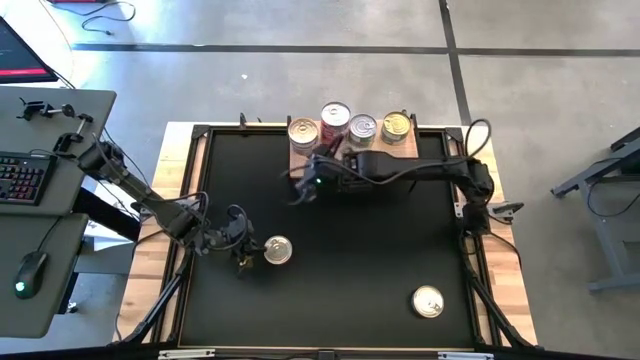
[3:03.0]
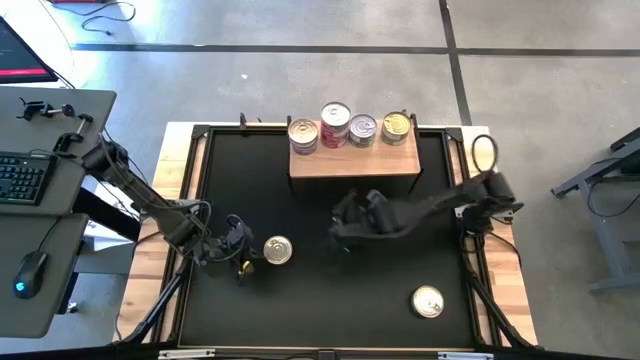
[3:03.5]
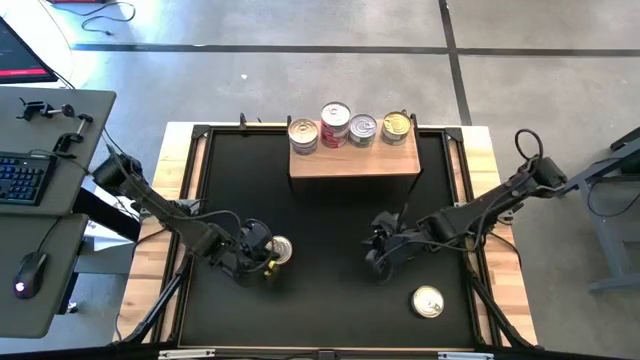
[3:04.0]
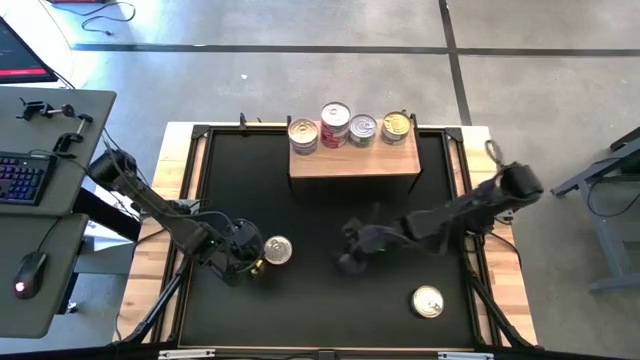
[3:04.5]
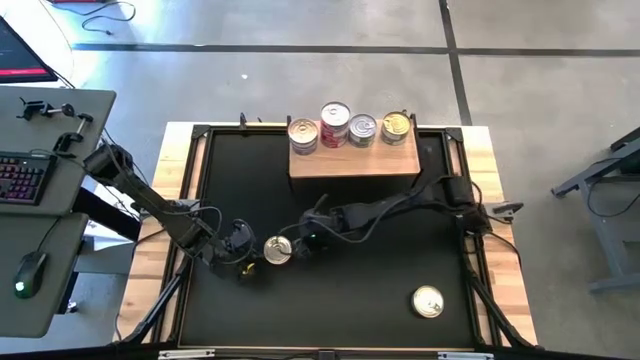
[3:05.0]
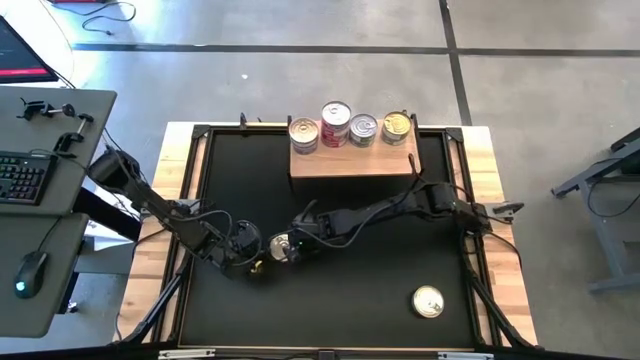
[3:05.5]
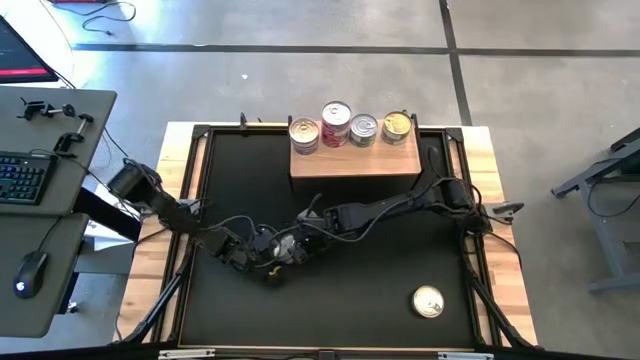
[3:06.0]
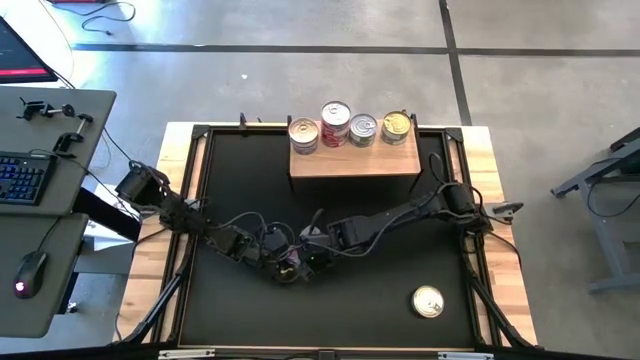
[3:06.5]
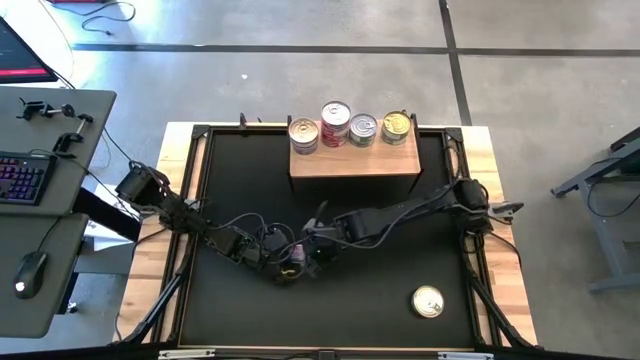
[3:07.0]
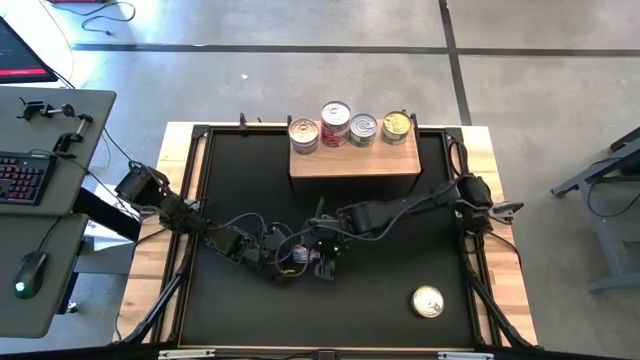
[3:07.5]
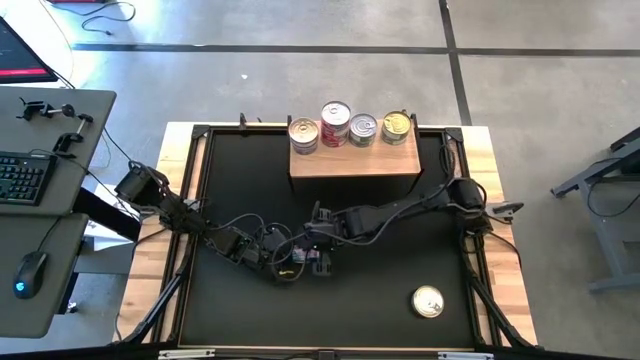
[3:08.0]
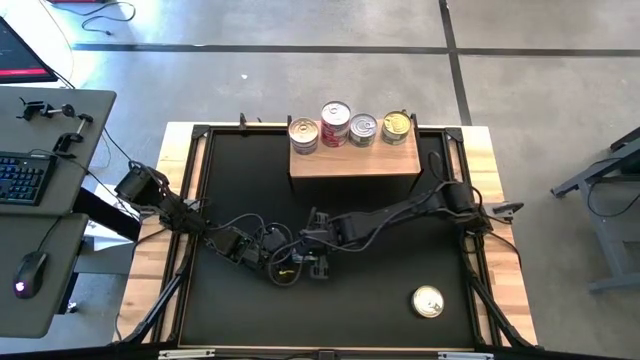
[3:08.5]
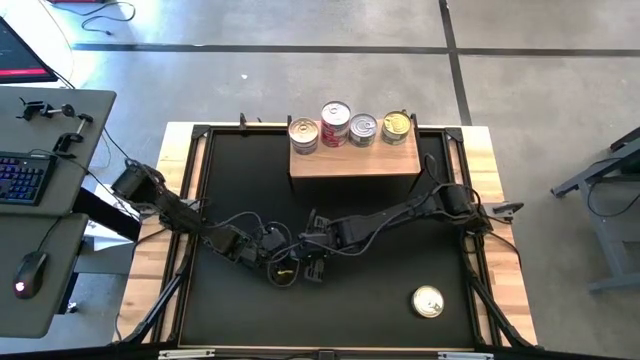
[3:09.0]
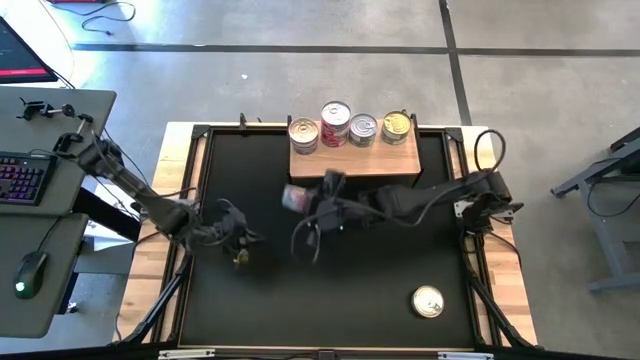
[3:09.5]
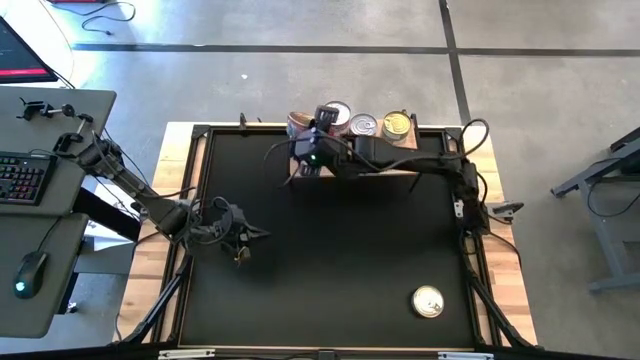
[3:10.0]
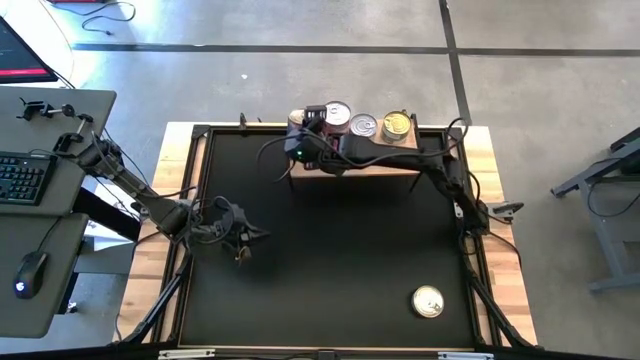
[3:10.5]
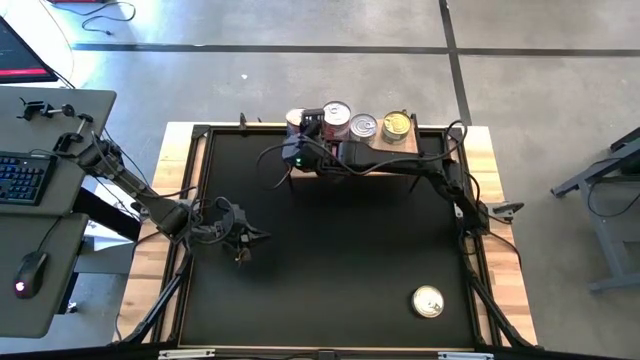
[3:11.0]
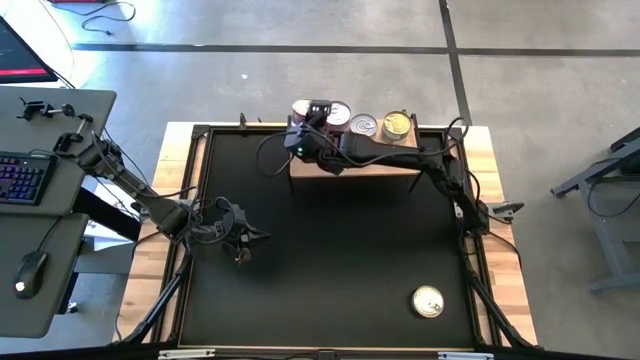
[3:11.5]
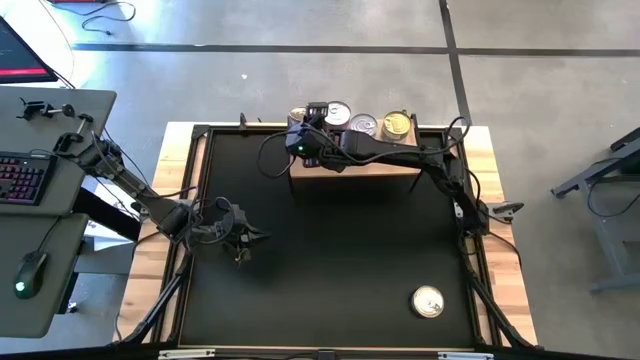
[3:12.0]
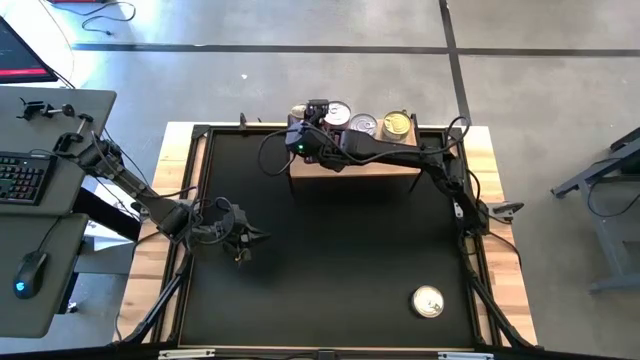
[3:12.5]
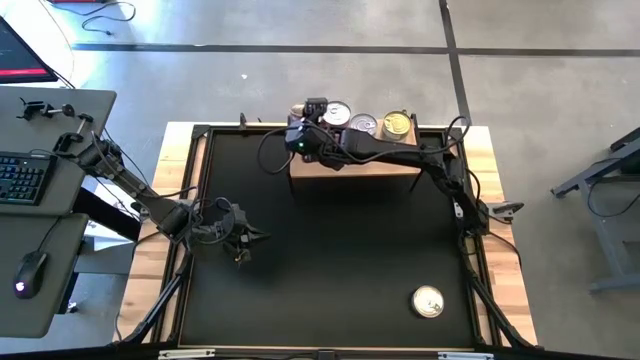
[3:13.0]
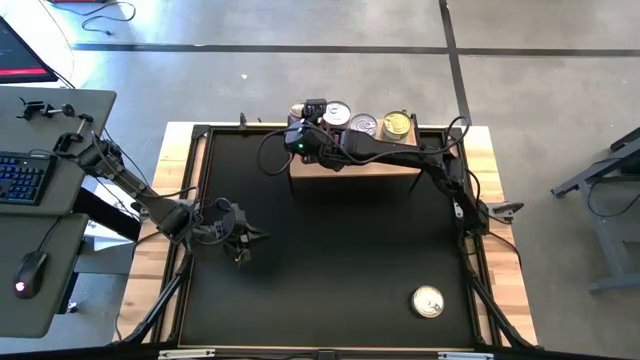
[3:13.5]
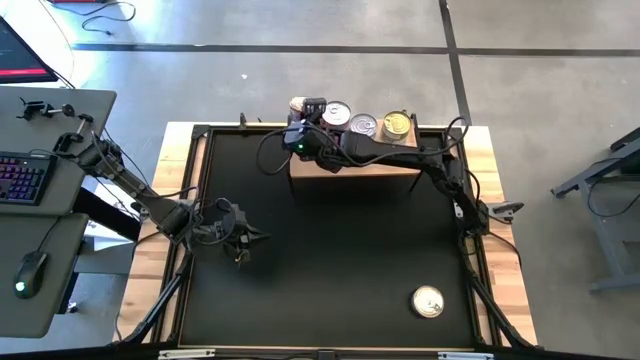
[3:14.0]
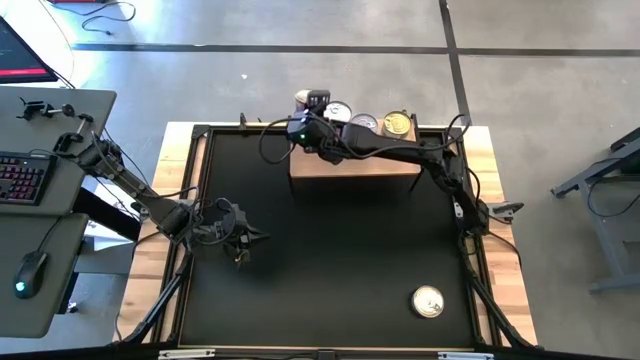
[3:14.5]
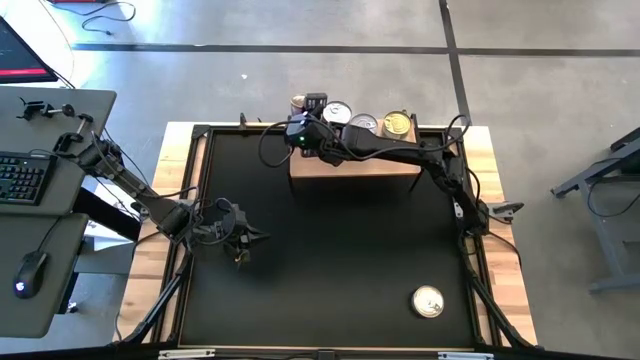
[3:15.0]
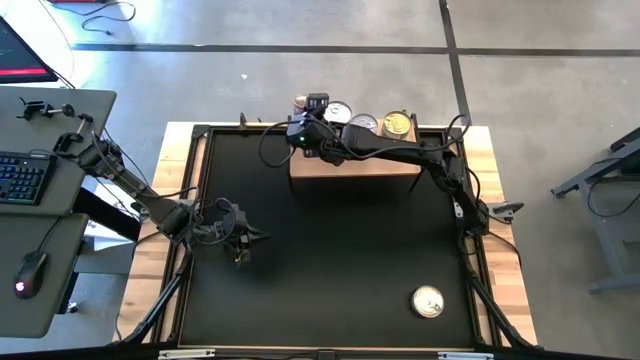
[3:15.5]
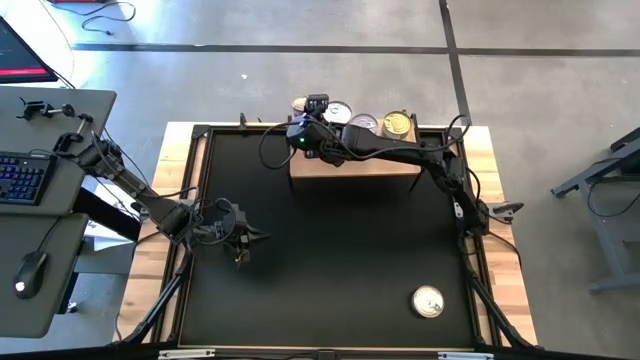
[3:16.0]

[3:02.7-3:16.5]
Task: Stack canned seafood by type on shelf
Stack the blue-pink tuna can on top of the blue-pink tuna can on the shelf

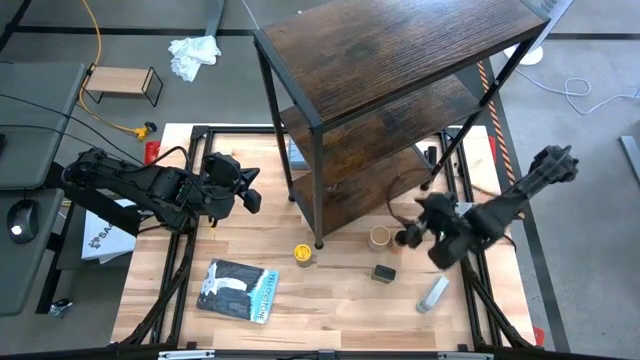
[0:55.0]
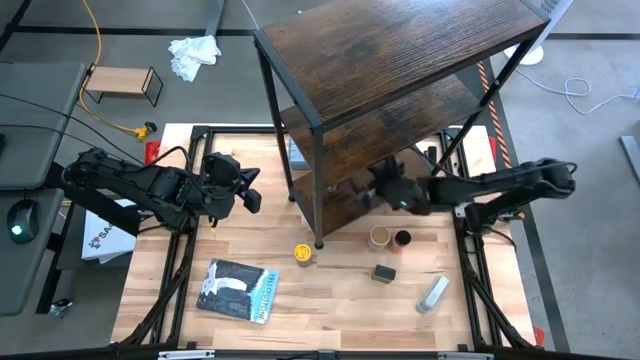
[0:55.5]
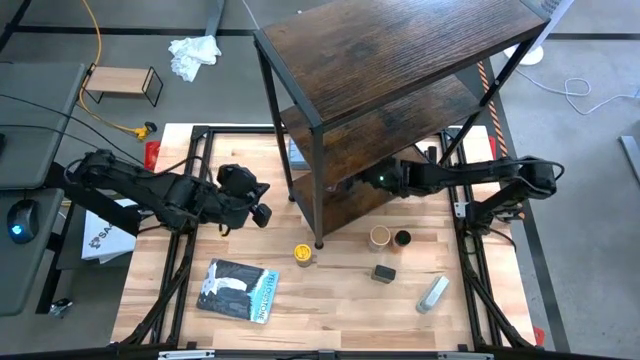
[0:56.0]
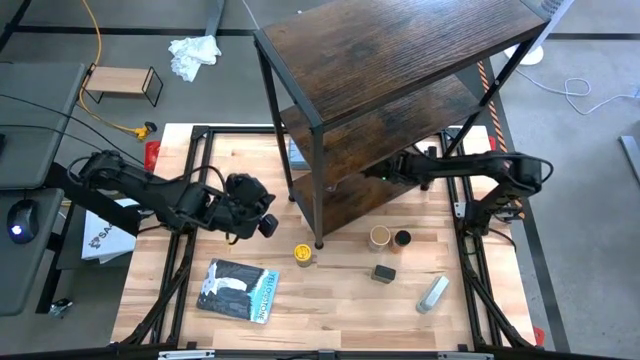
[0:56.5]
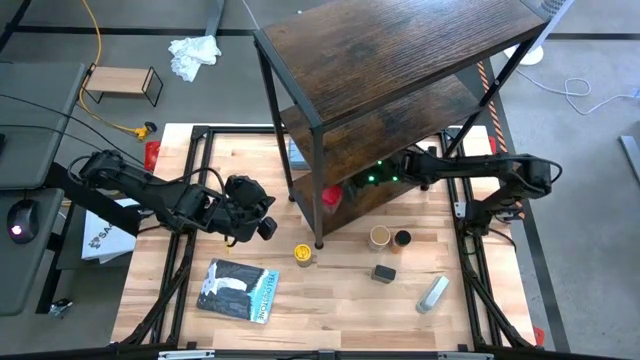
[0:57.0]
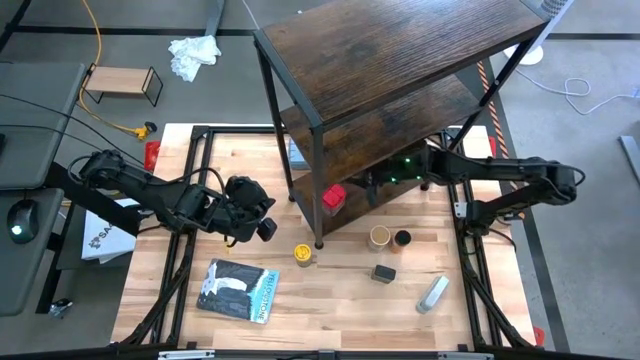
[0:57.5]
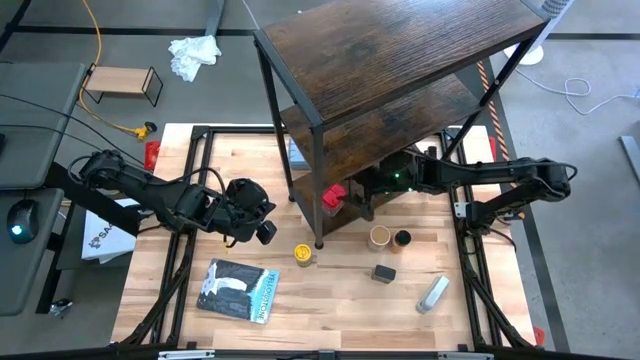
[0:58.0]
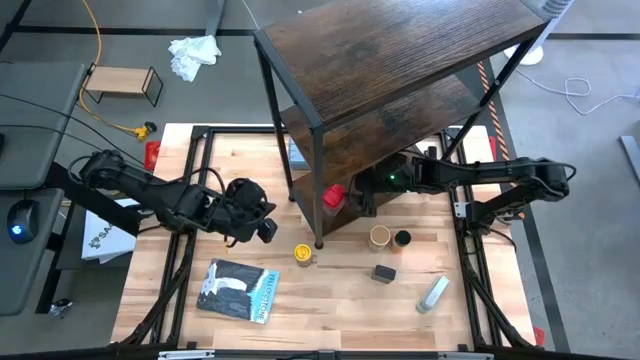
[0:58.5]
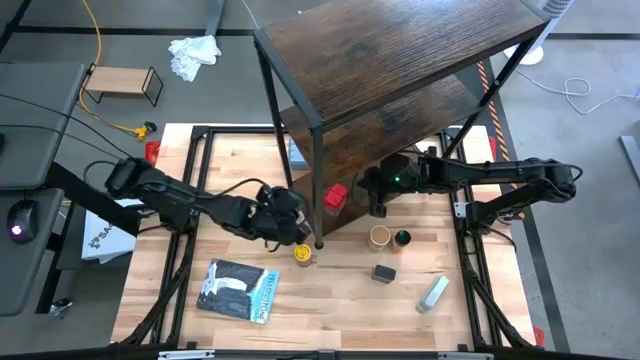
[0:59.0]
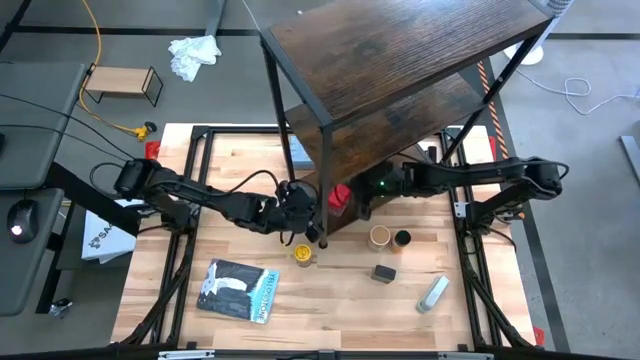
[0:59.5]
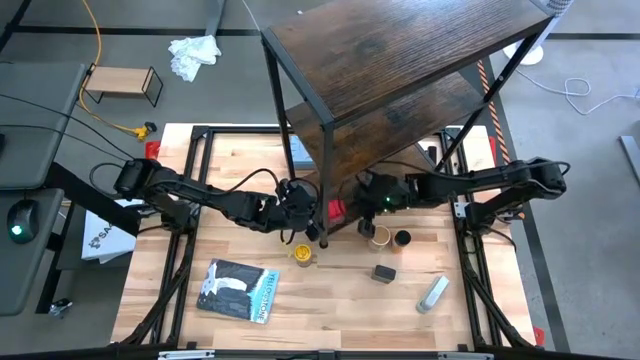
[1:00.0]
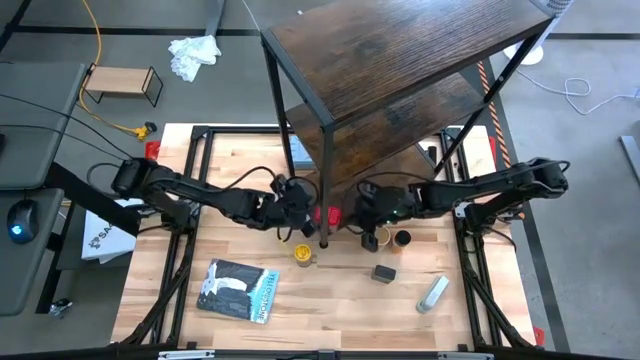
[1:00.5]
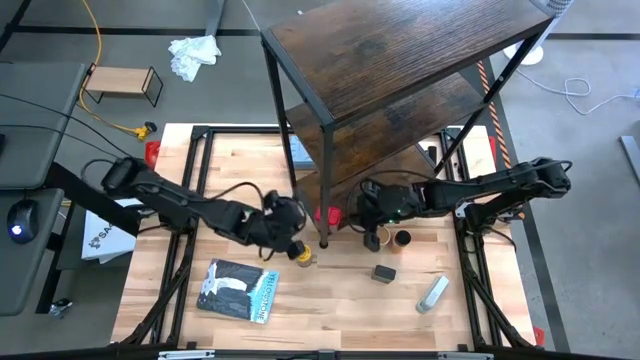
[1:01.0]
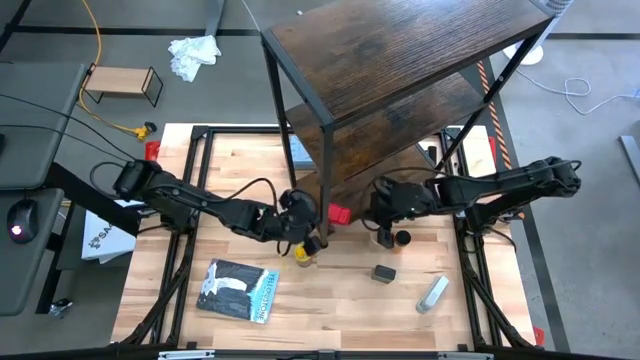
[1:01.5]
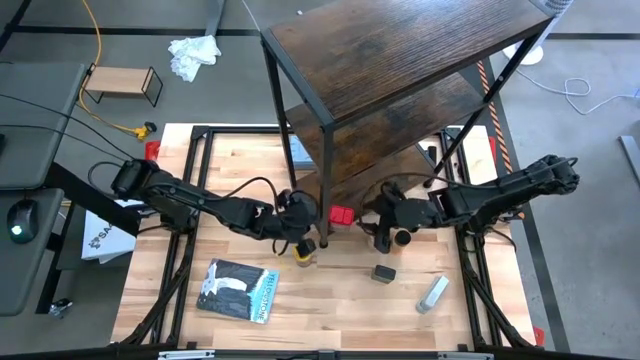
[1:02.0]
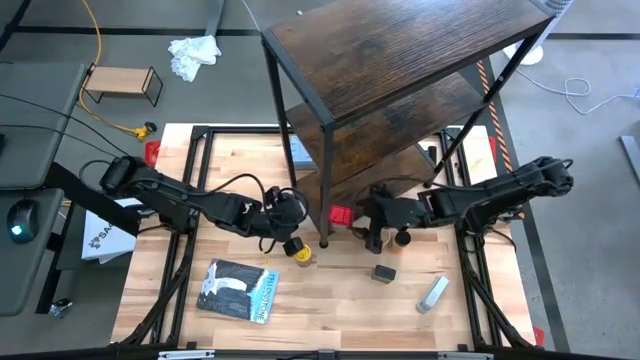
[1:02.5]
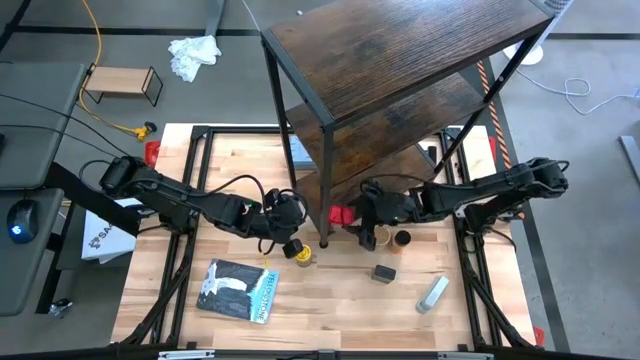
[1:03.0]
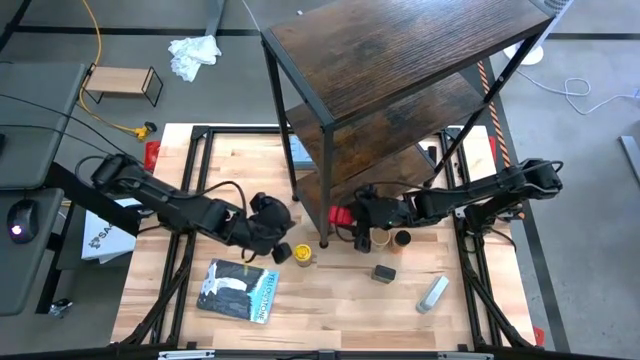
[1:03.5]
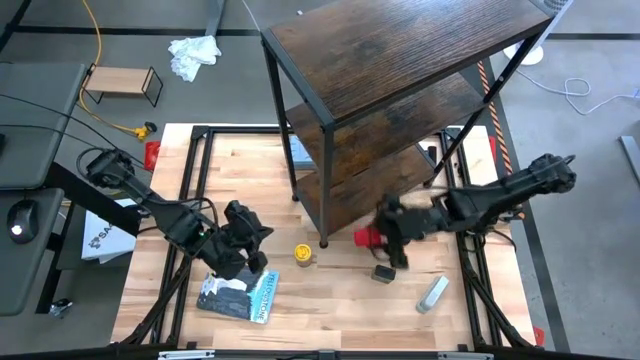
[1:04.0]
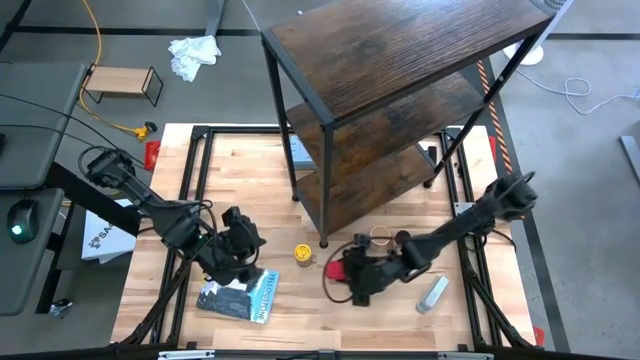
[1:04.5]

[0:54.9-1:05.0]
Task: Shelf spices
Remove the red seasoning can from the shelf
